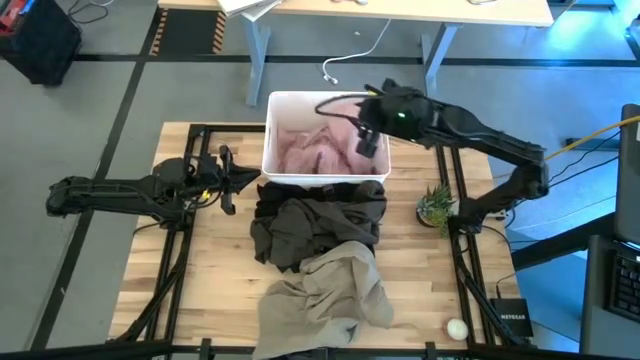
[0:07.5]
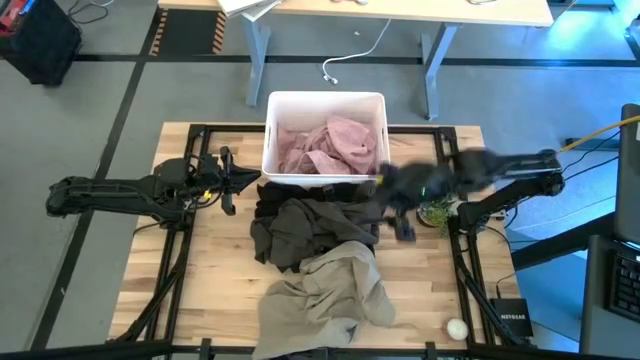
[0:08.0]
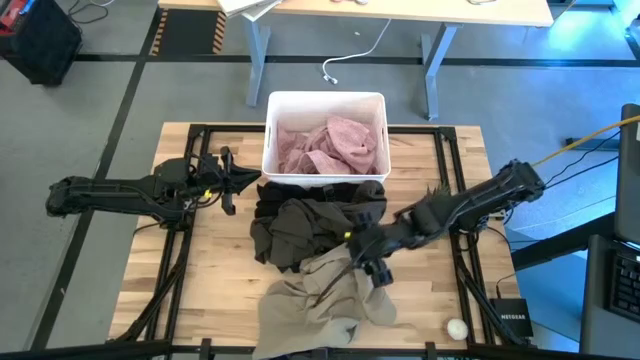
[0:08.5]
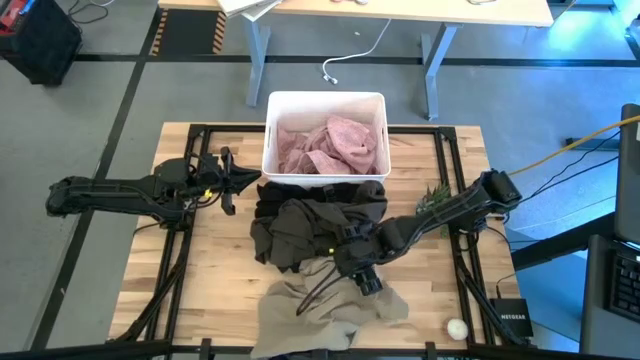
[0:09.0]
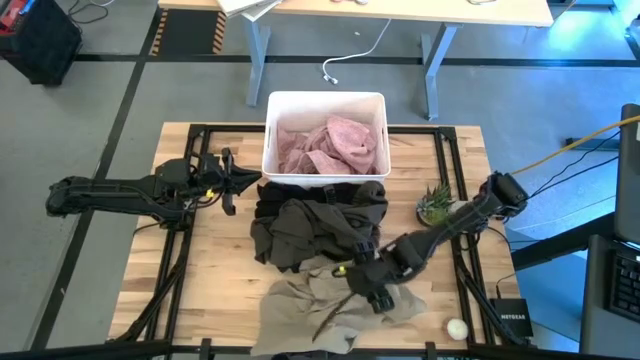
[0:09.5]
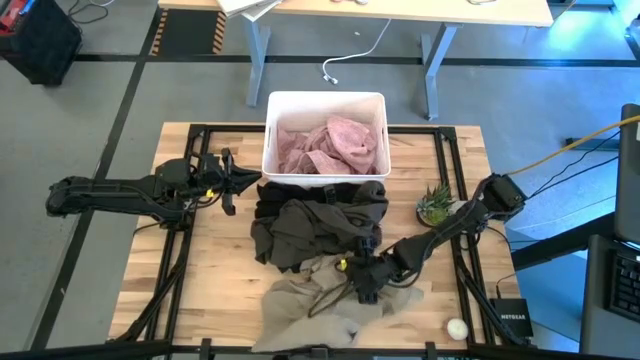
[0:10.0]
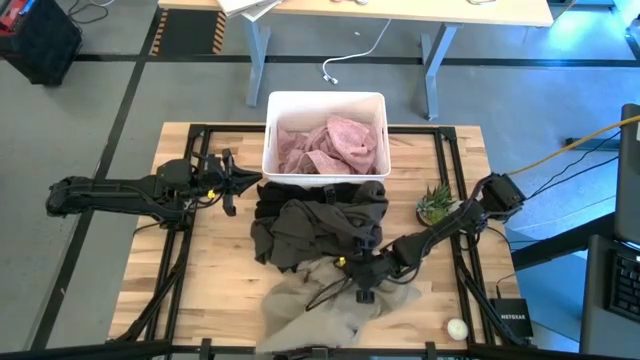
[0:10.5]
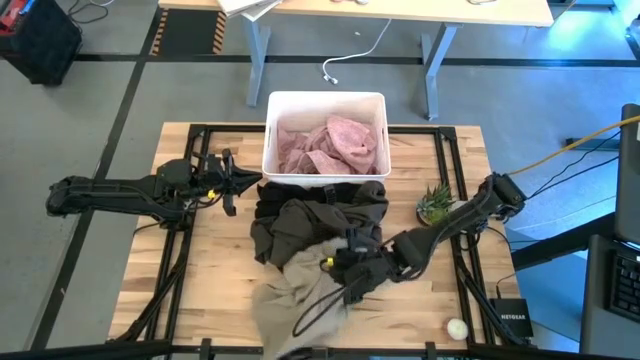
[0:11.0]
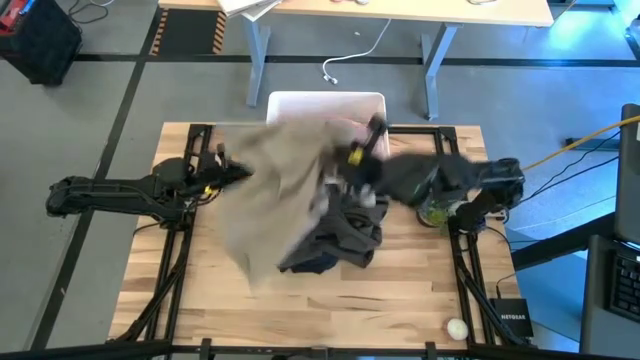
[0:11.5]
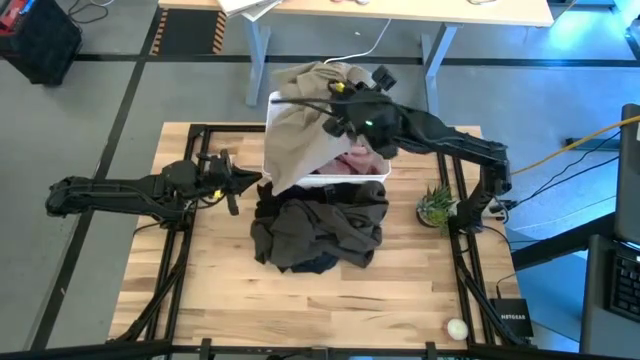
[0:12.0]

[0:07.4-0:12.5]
Task: Sort clothes
Put the light brown pants into the bin

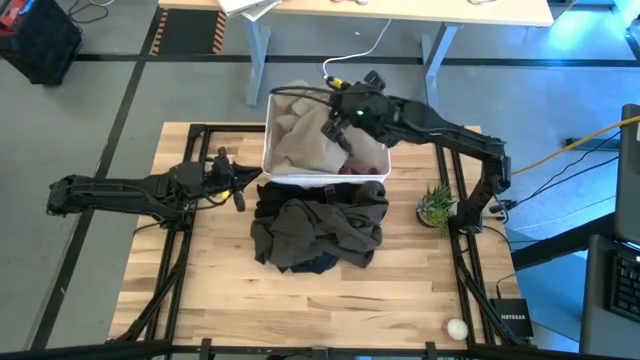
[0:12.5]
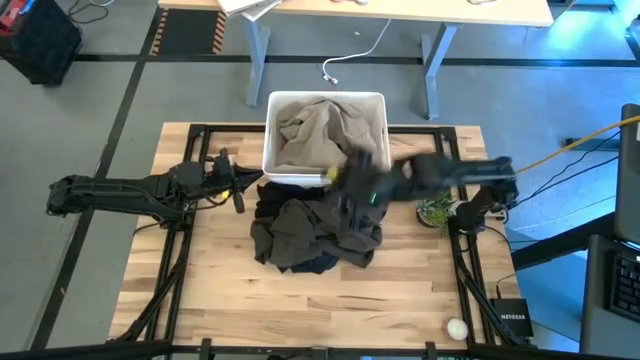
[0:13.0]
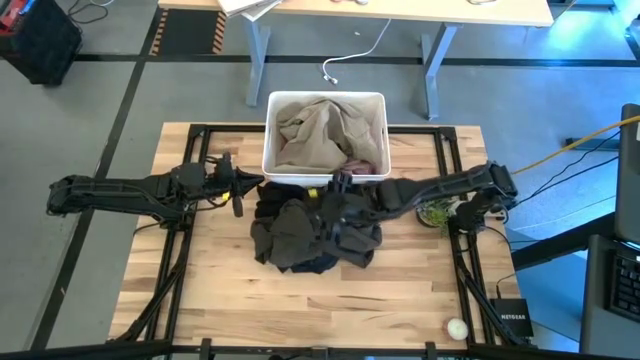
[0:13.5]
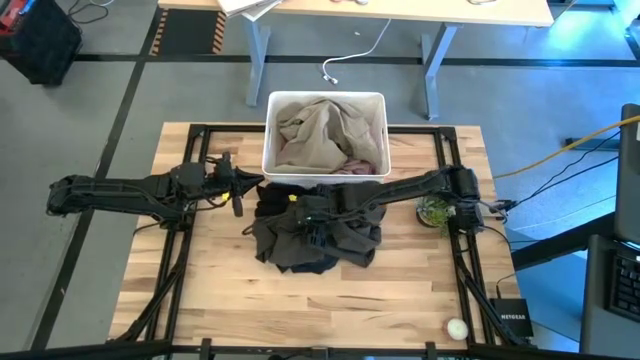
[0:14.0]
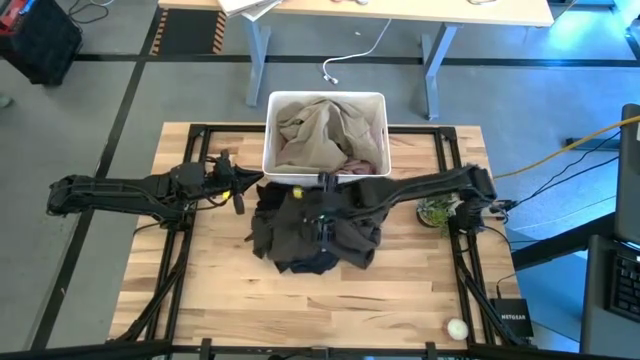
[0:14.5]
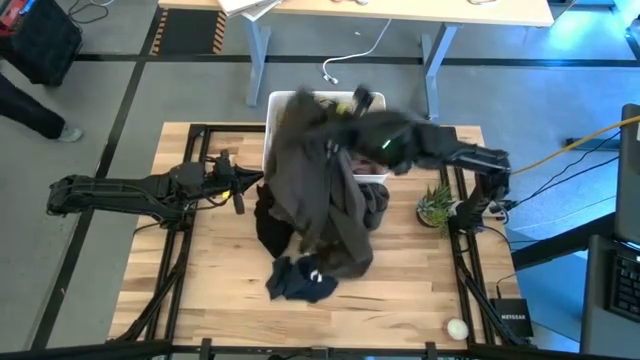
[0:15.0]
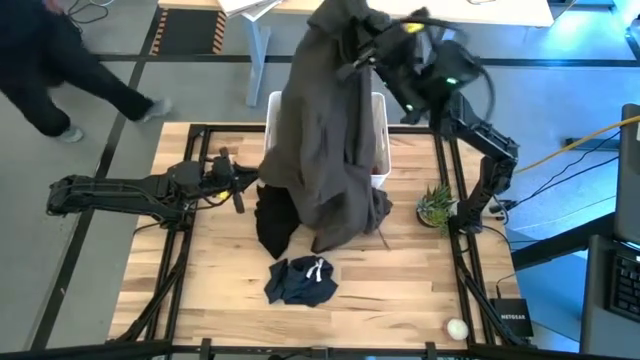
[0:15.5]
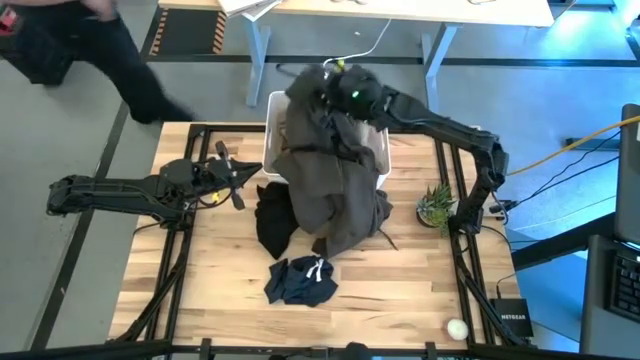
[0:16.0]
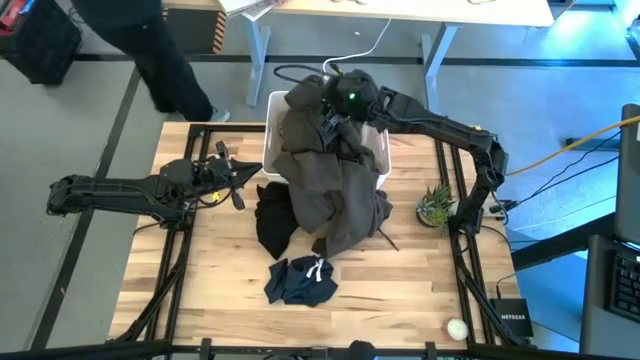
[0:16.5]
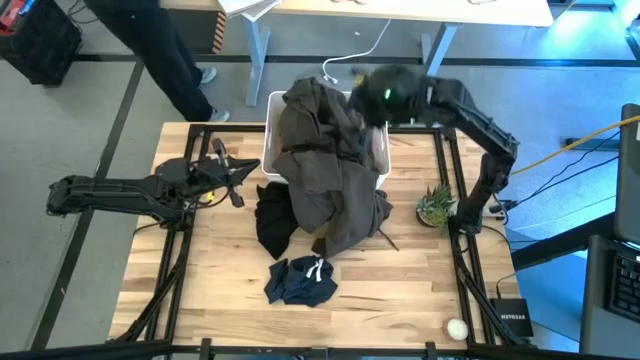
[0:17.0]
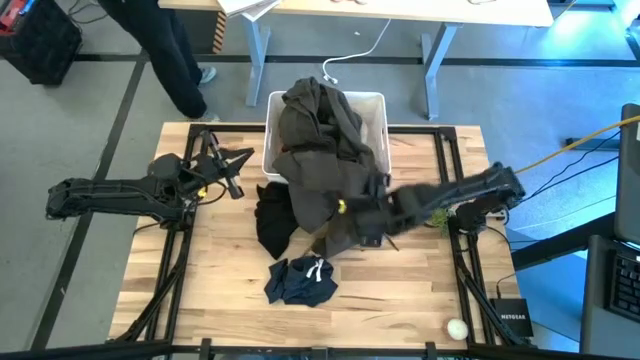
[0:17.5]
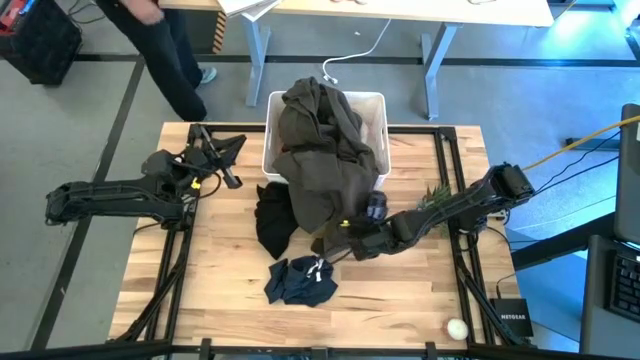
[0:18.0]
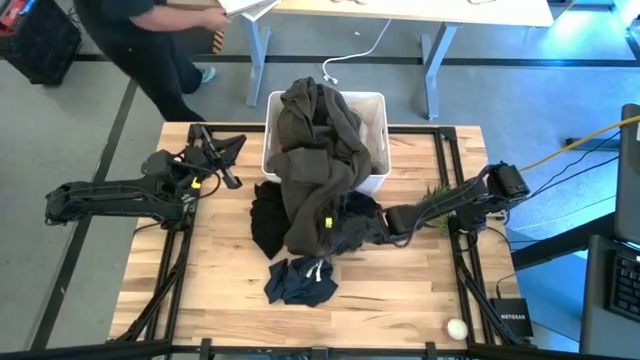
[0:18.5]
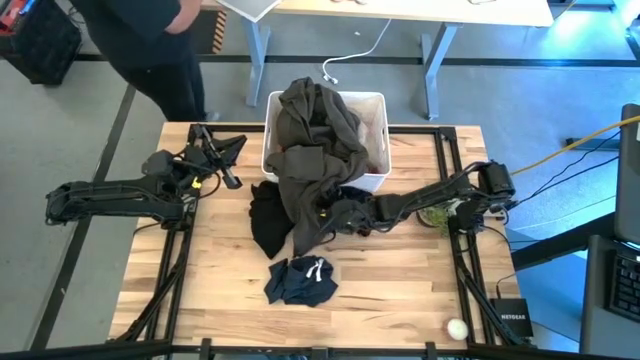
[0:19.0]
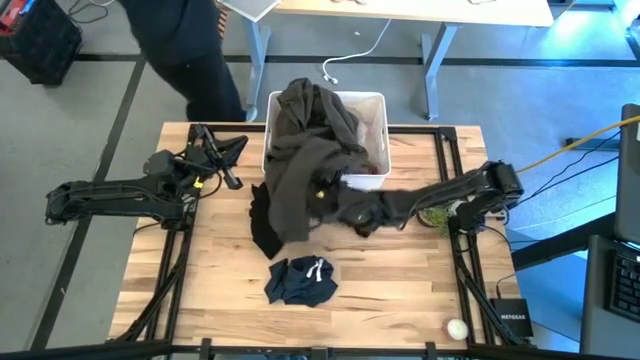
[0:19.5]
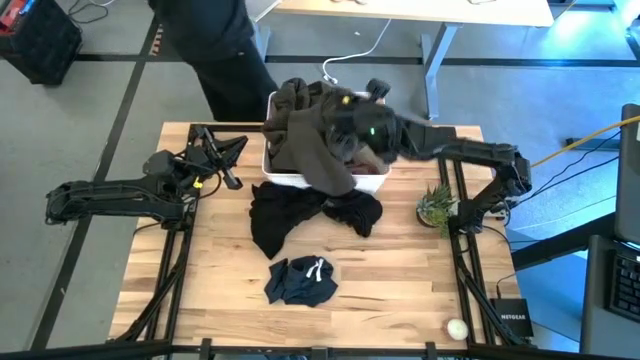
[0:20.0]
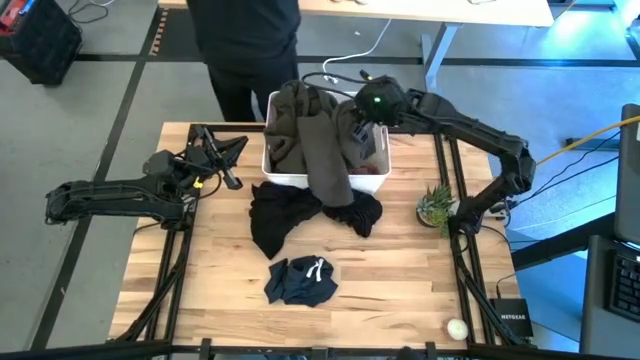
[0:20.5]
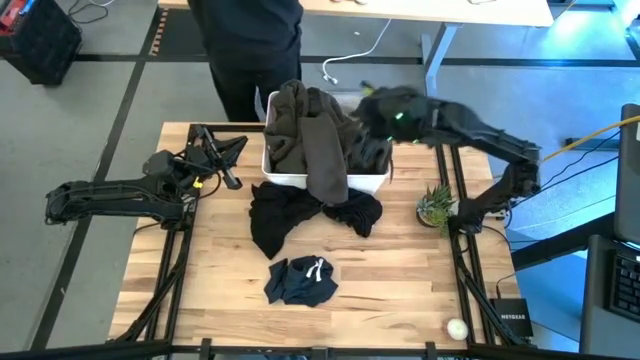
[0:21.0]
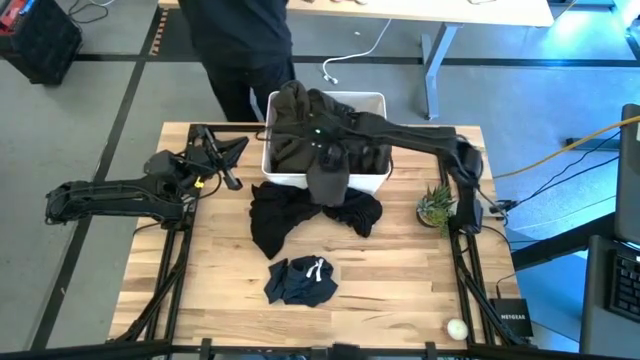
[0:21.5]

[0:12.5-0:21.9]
Put the gray jacket into the bin

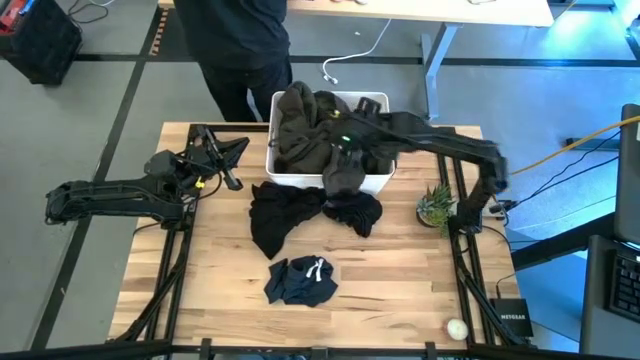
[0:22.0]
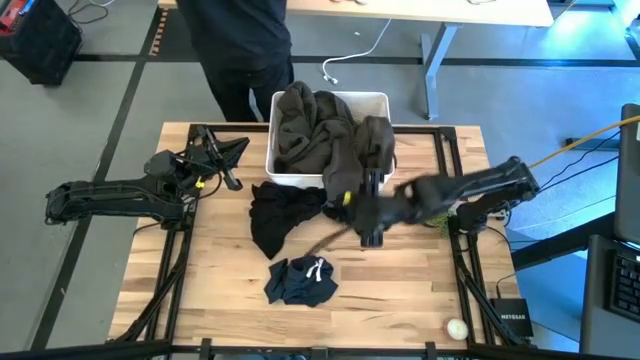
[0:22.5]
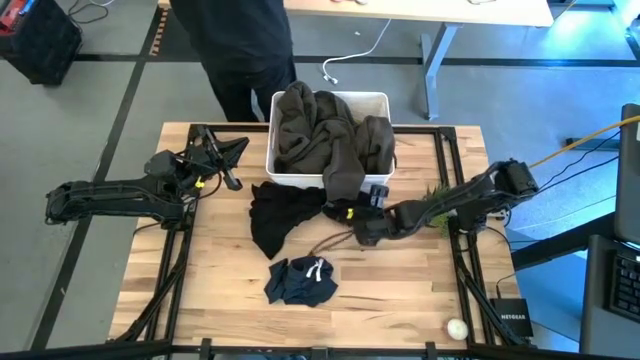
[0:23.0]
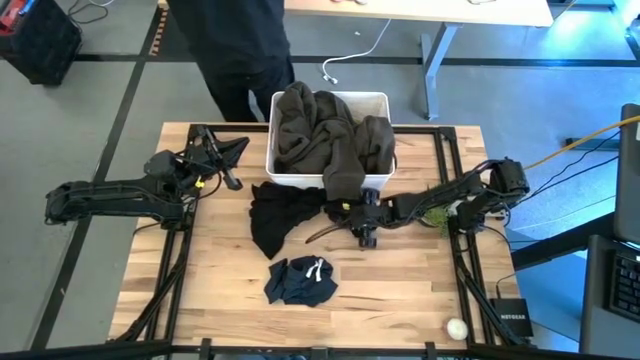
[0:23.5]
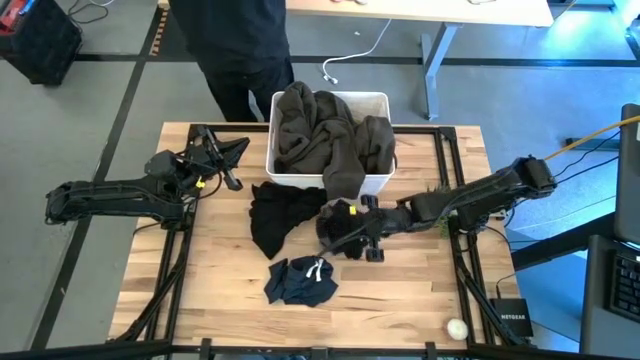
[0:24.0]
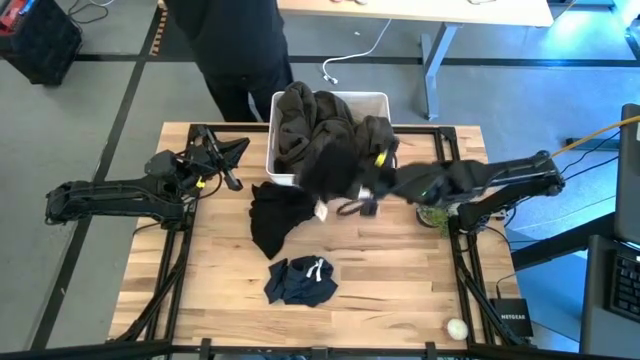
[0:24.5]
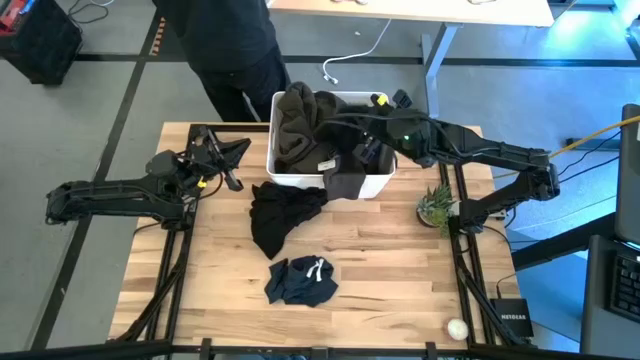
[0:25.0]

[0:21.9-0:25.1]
Put the black boxer shorts into the bin

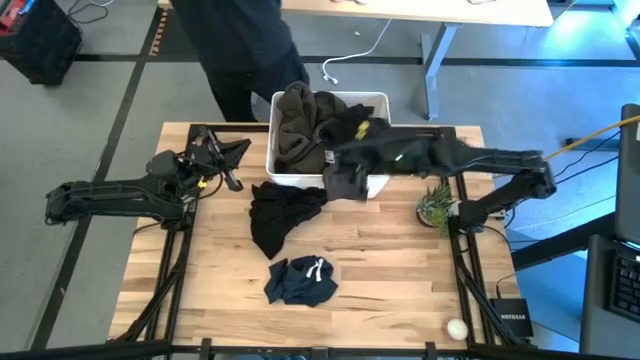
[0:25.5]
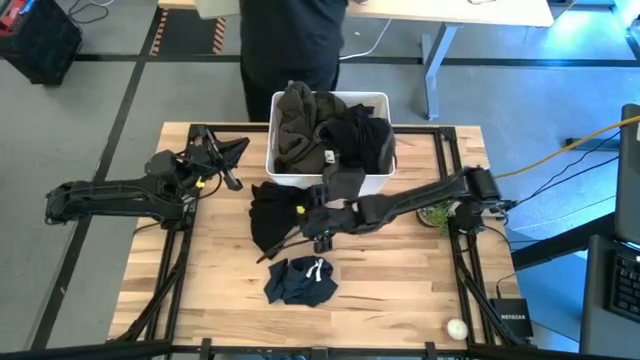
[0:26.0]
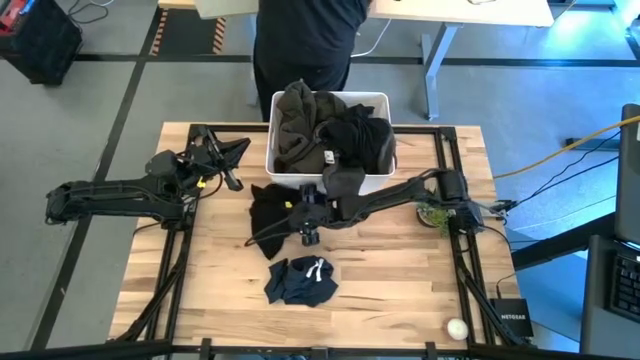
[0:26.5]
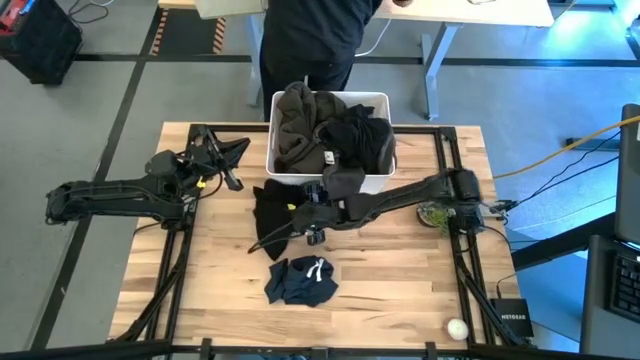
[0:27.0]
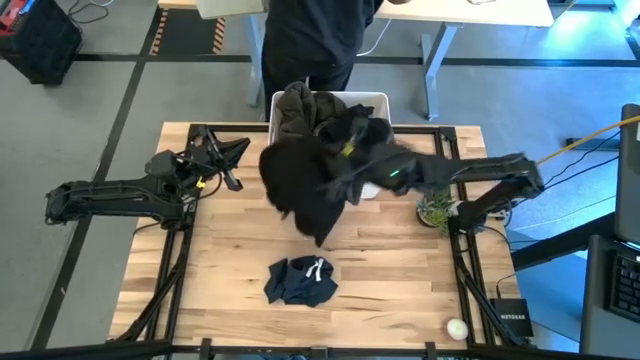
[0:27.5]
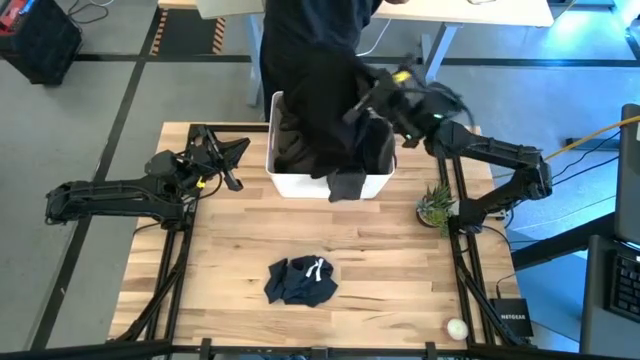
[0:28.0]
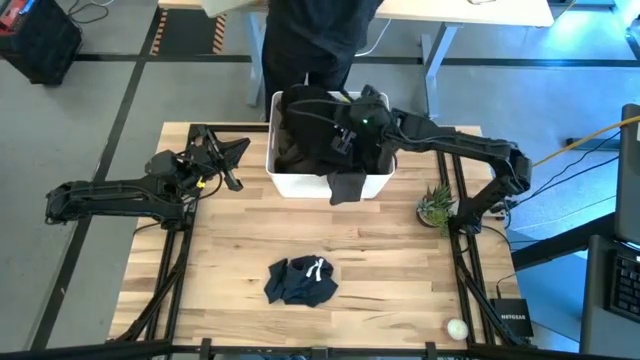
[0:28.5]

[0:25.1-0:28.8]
Put the black t-shirt into the bin
